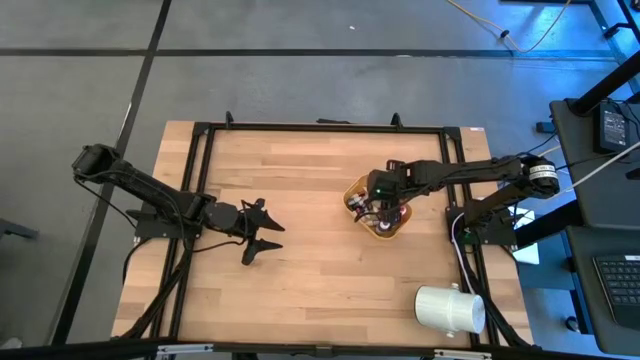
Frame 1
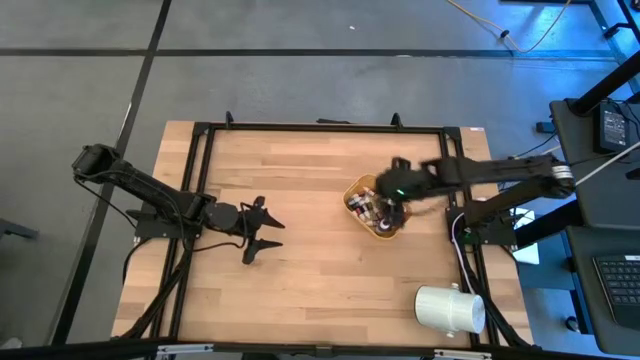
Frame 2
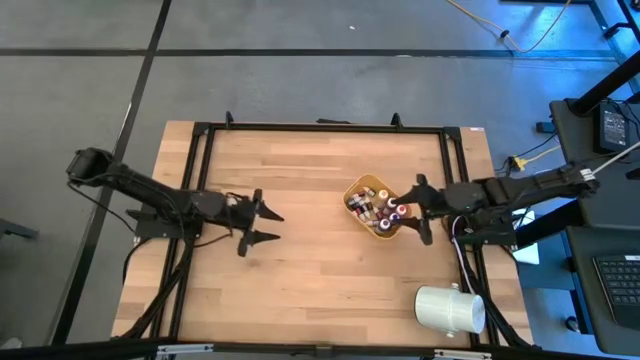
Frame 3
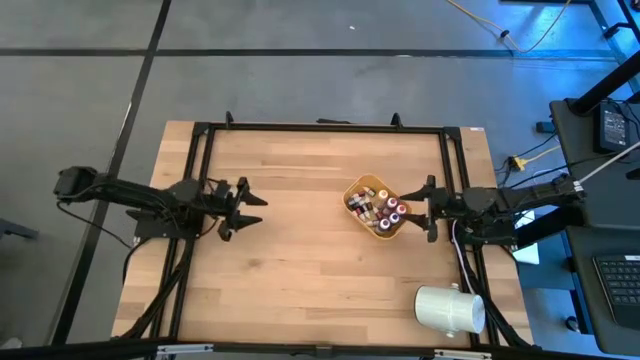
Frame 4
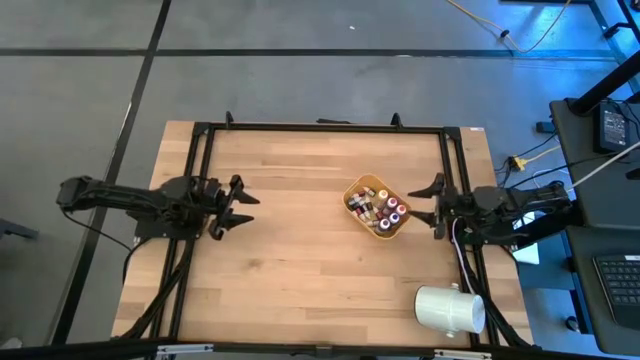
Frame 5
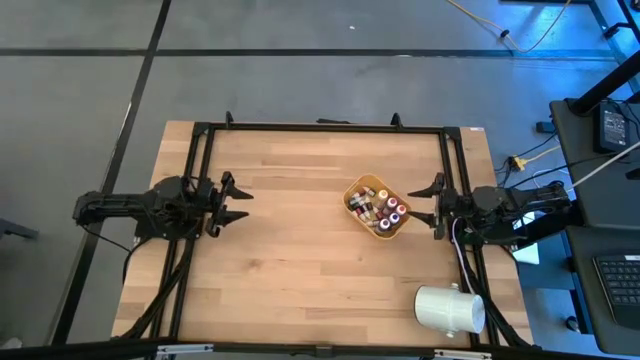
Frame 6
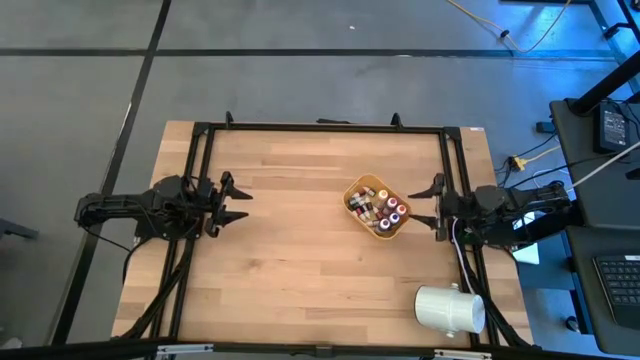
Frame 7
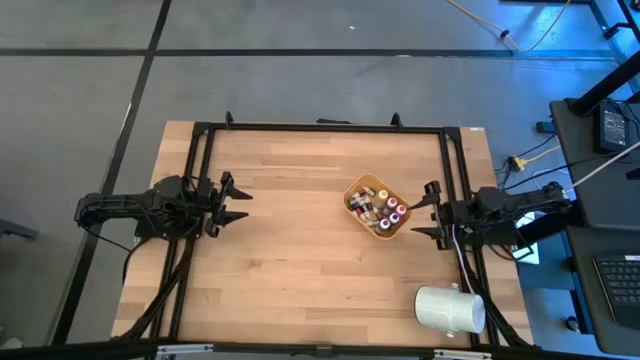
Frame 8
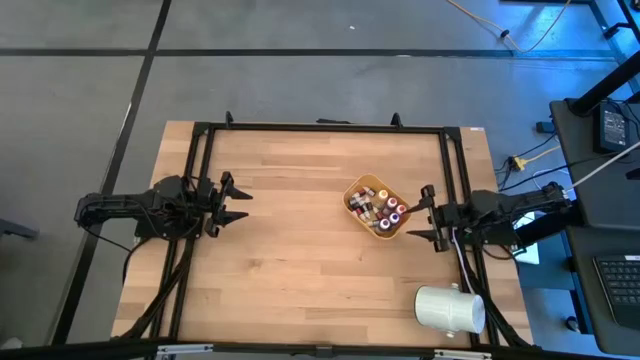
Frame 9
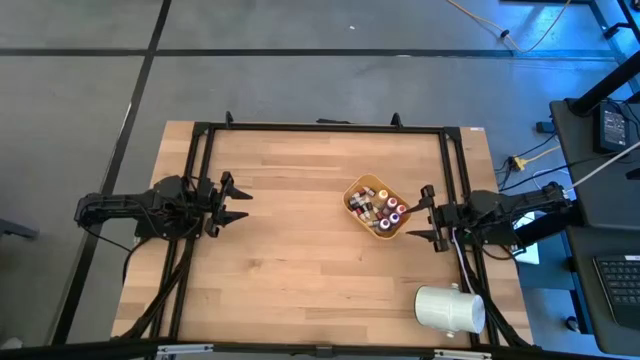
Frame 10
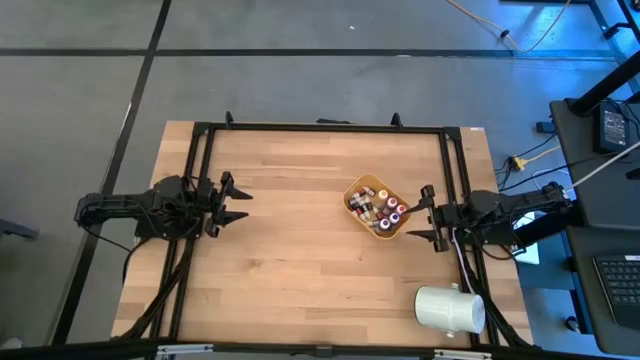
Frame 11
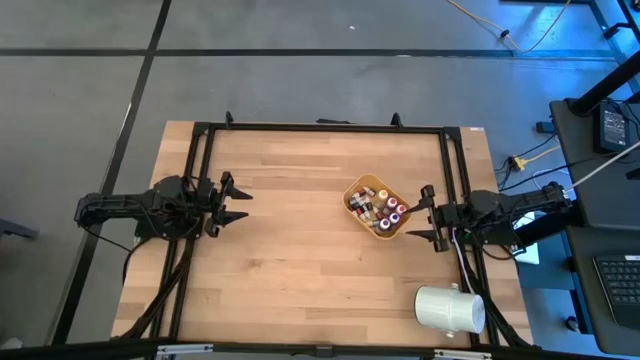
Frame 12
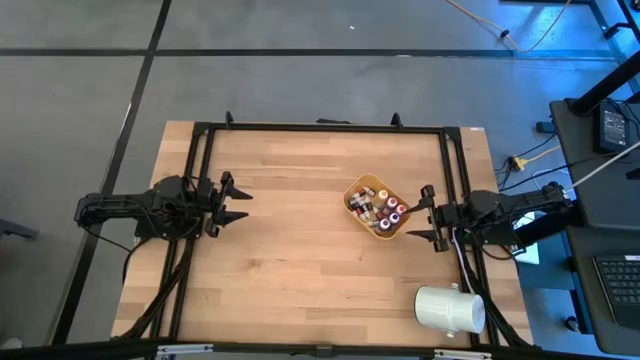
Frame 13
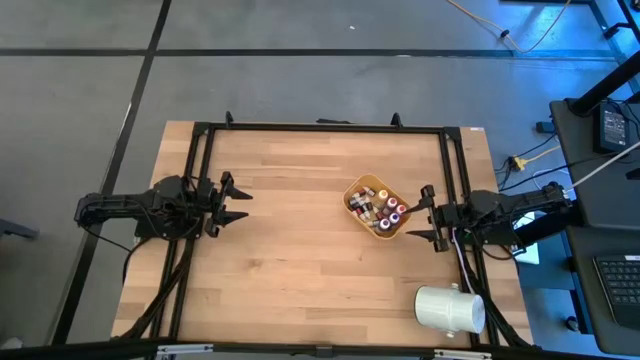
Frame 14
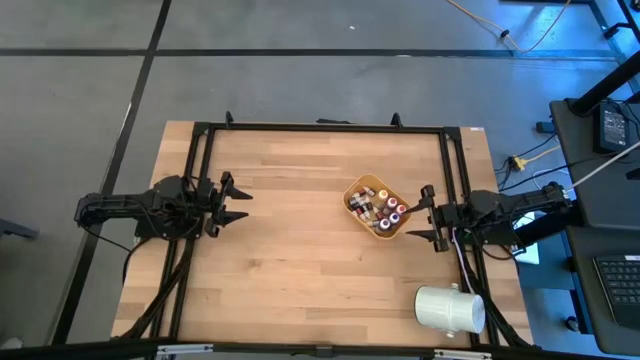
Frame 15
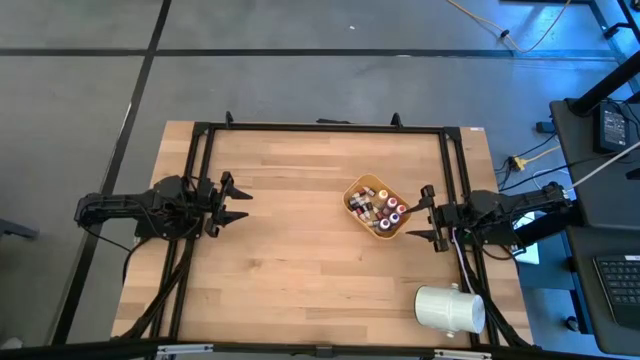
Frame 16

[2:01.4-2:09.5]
Task: Pick & Place food coloring
Return to Home Position

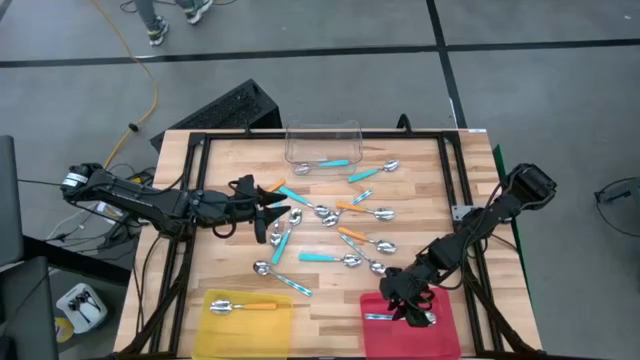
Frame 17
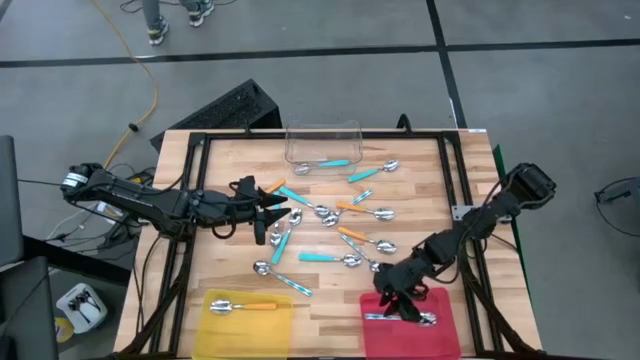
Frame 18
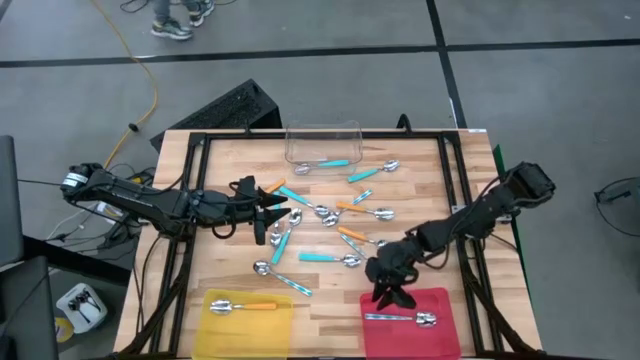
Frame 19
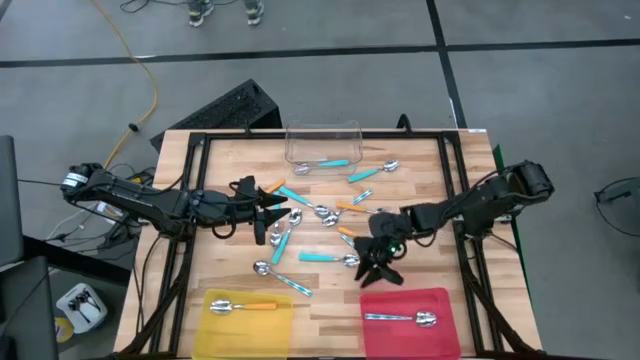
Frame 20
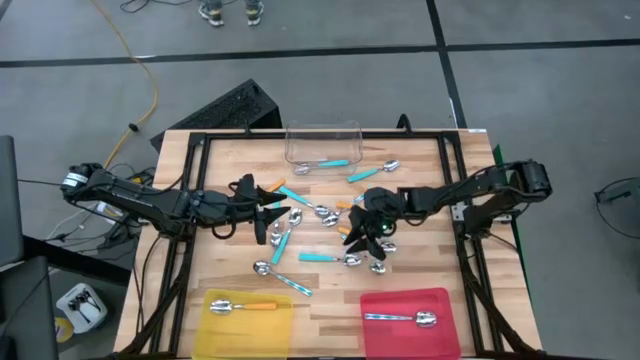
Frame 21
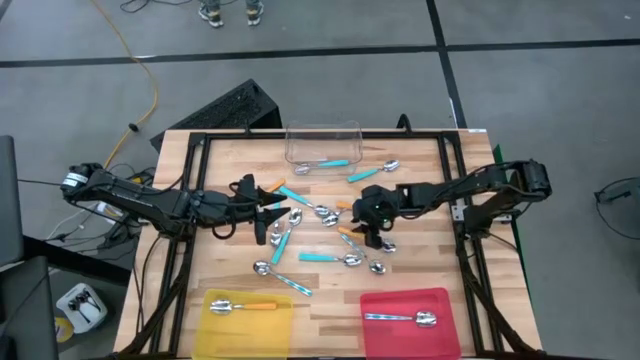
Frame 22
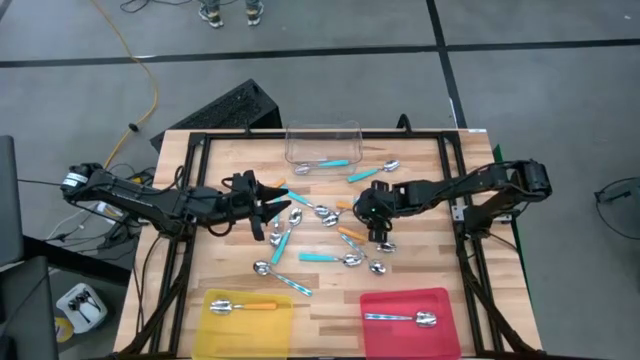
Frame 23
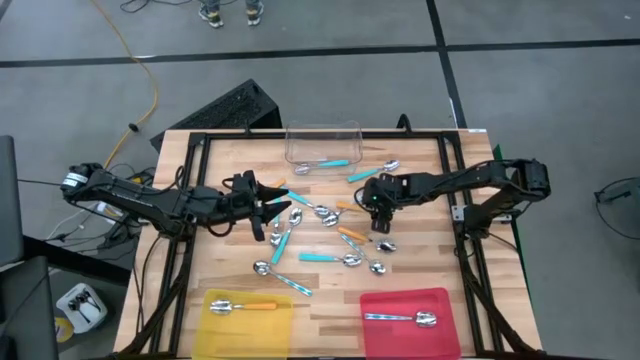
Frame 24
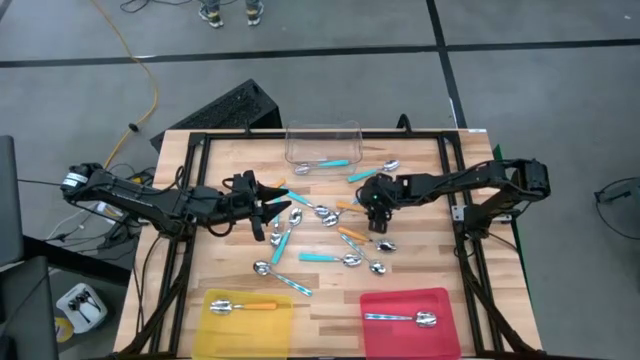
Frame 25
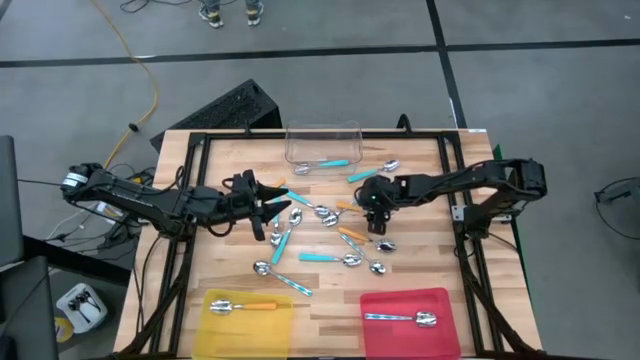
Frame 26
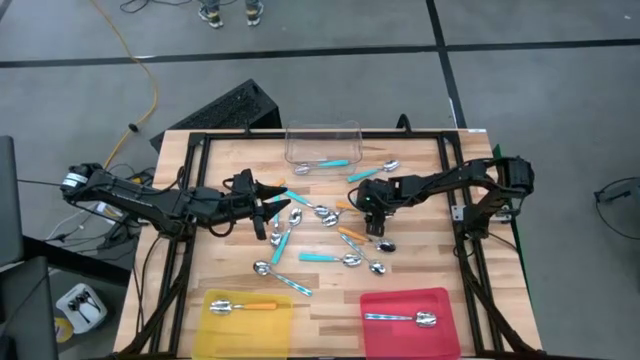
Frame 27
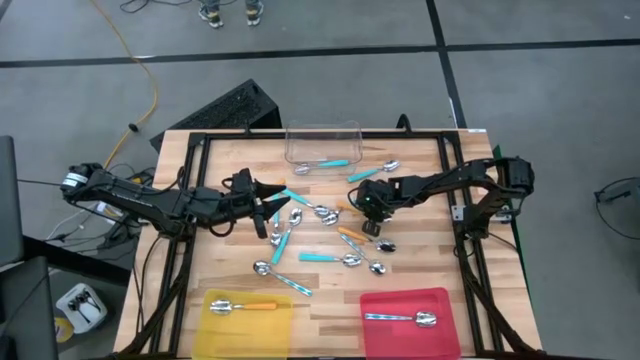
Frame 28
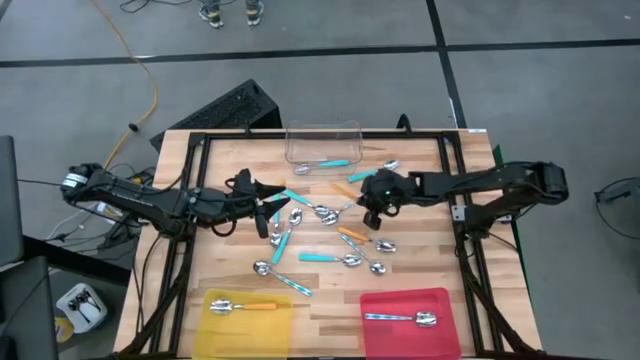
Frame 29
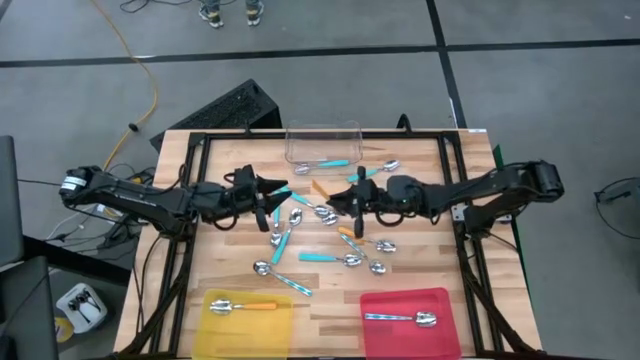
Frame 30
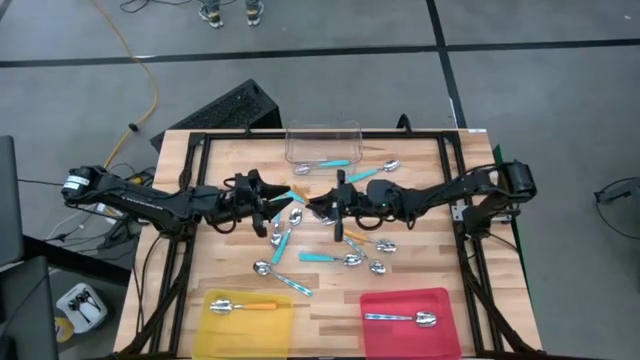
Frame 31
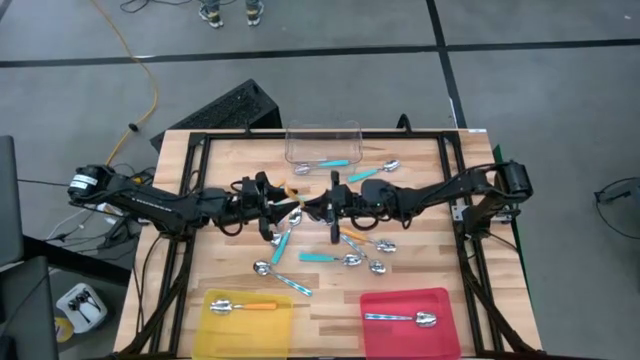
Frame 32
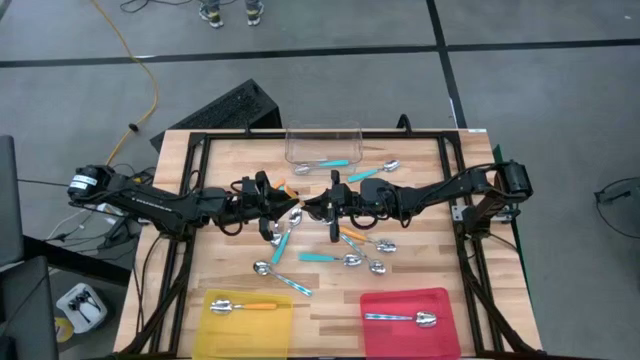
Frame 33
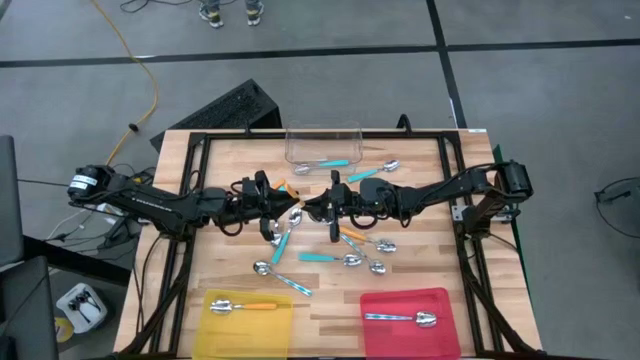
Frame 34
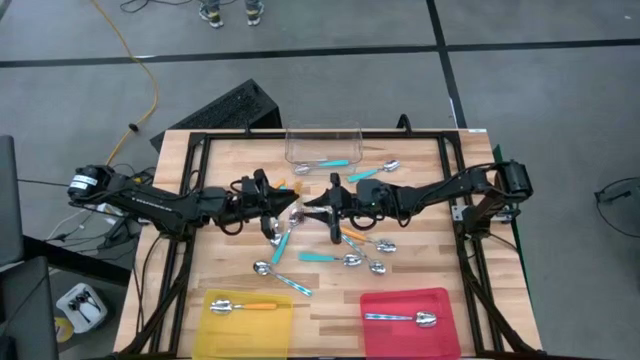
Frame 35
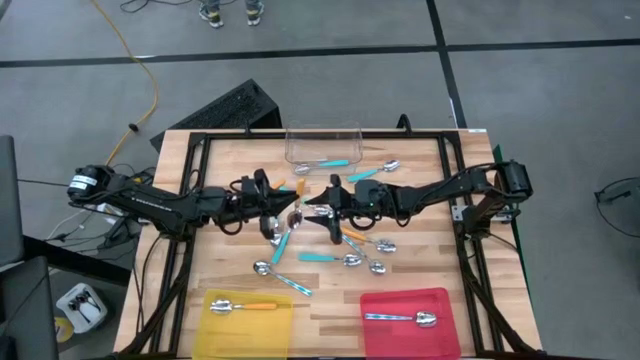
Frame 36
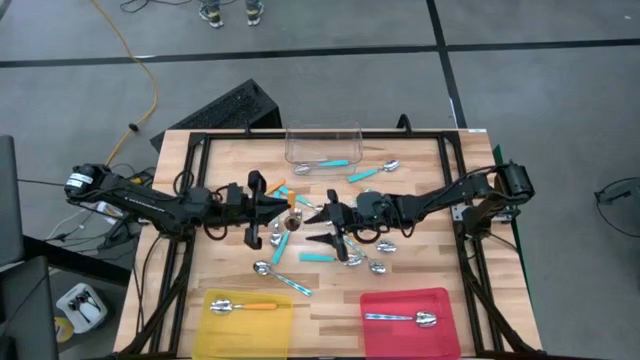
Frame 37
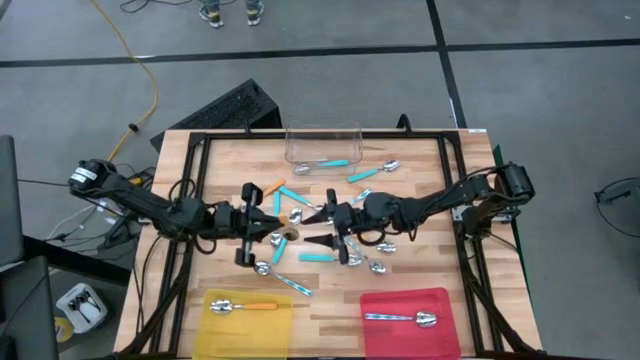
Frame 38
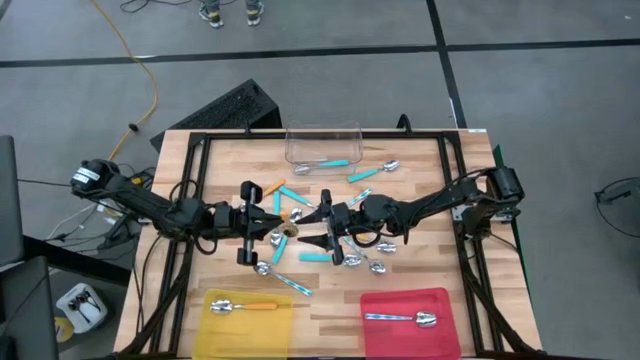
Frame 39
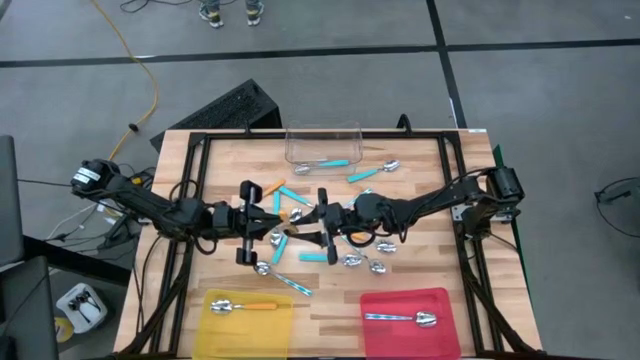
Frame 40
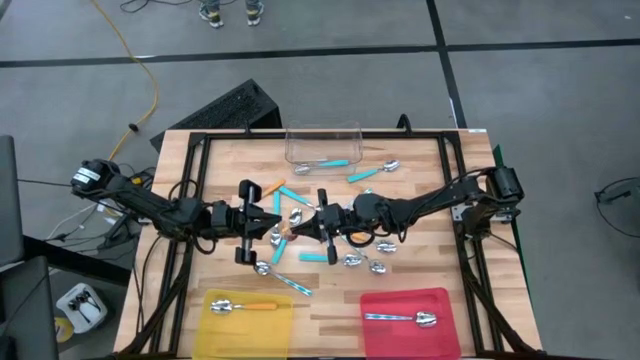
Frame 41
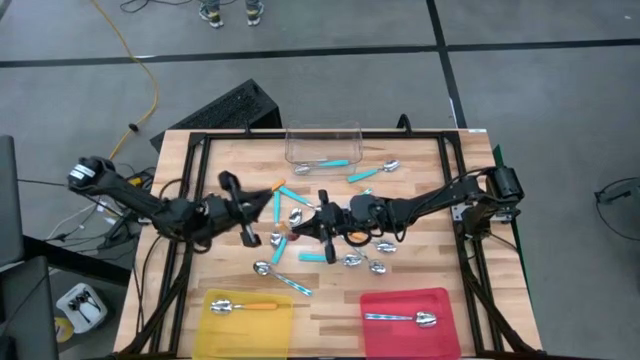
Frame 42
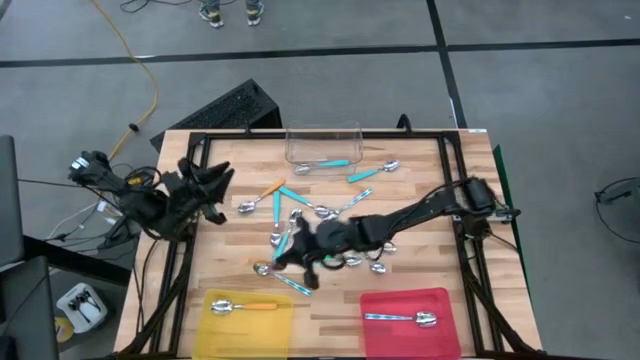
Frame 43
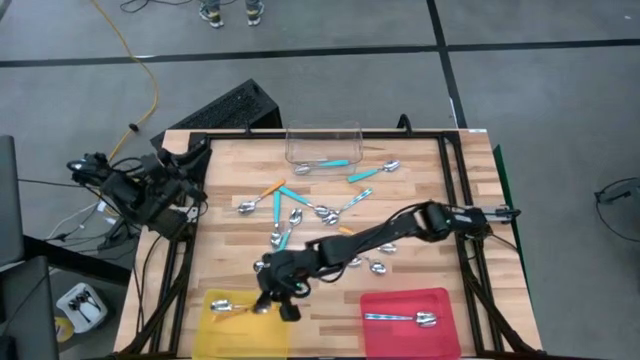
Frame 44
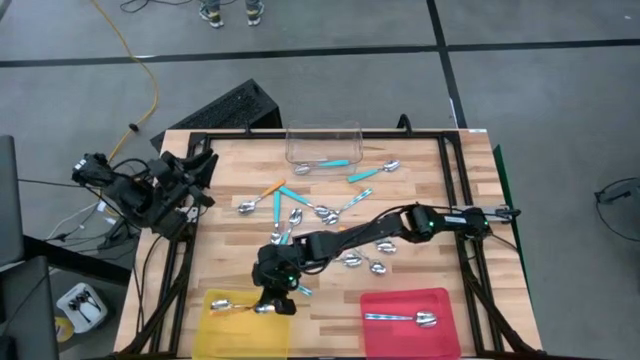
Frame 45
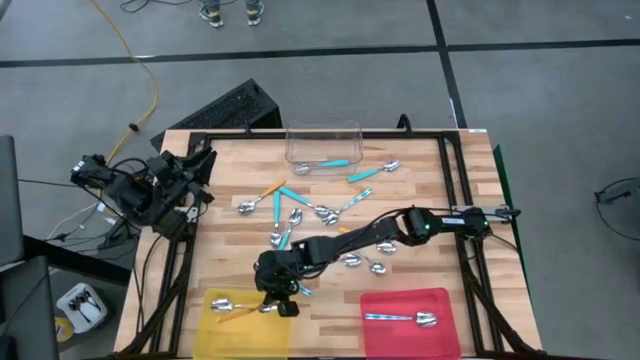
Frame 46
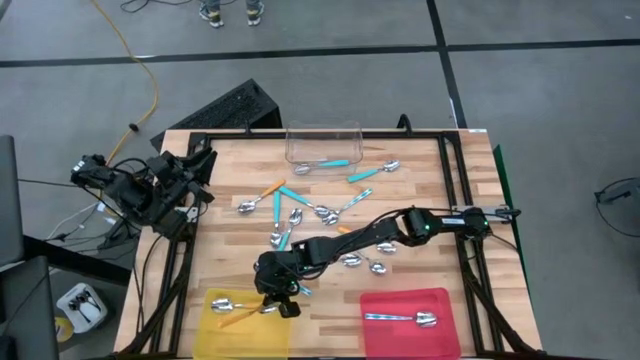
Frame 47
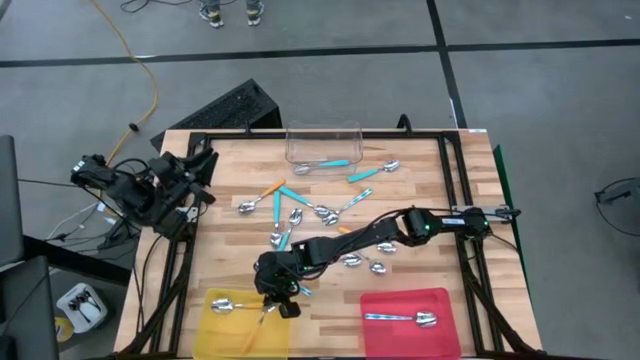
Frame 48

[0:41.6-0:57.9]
Task: Sort silverware by color (type)
Put the yellow spoon into the yellow bin
